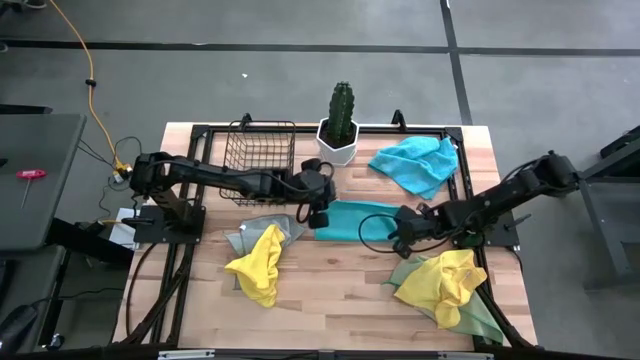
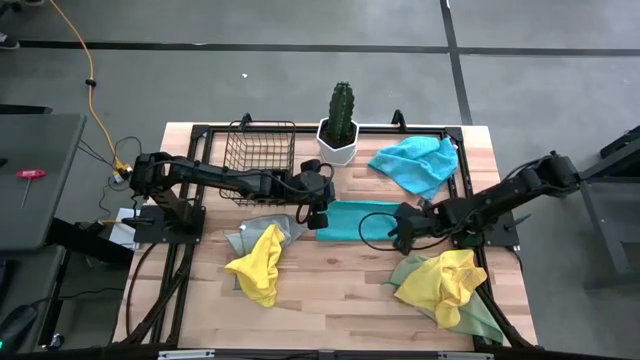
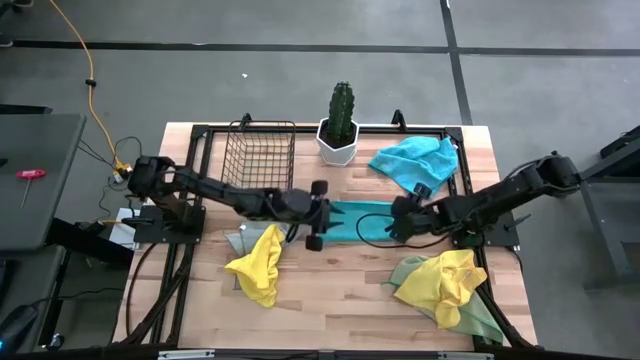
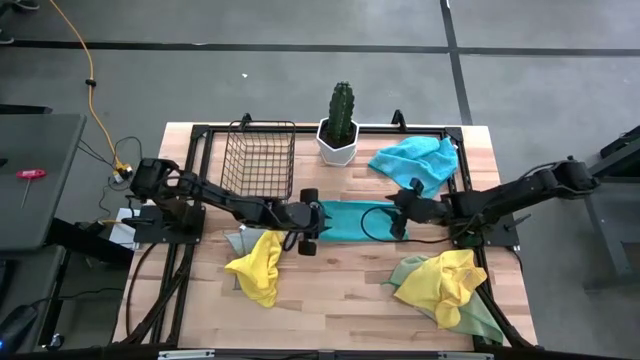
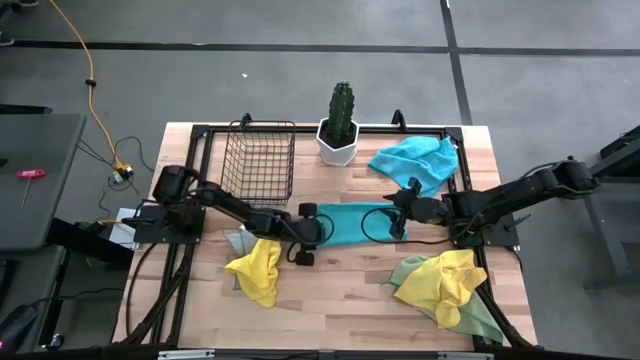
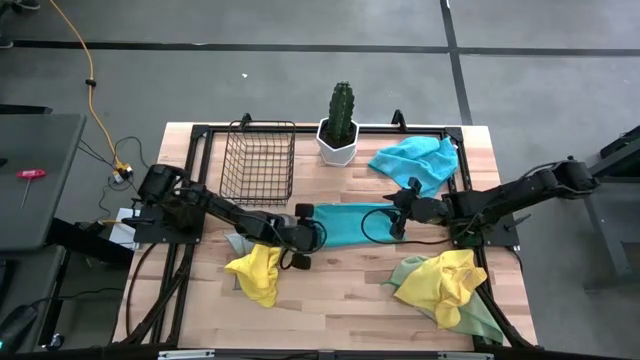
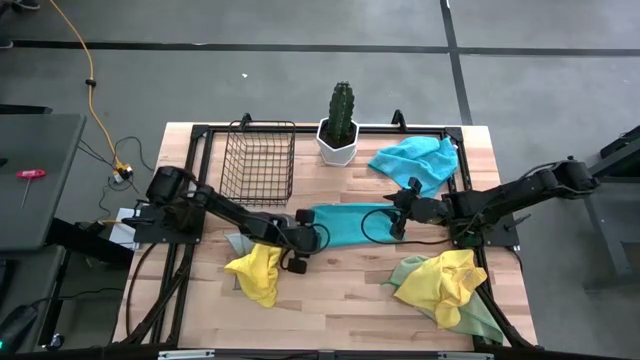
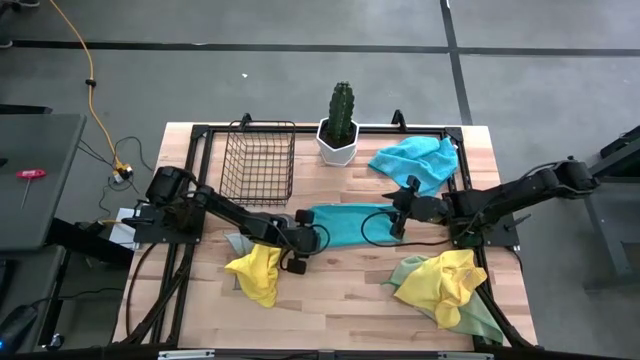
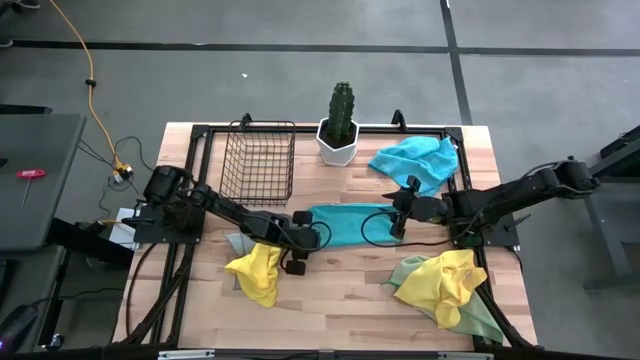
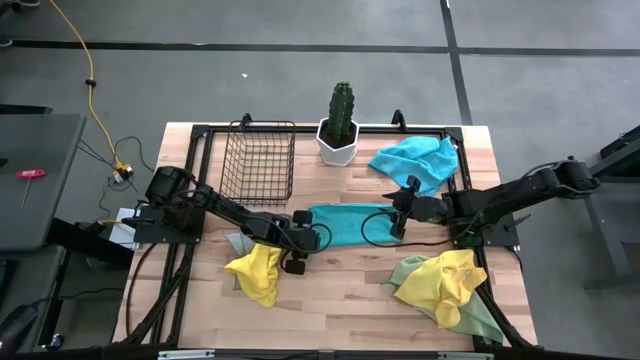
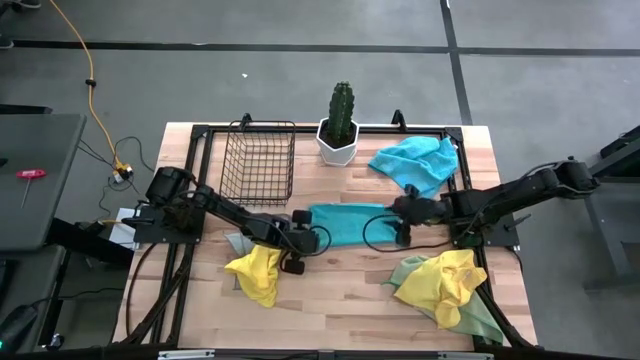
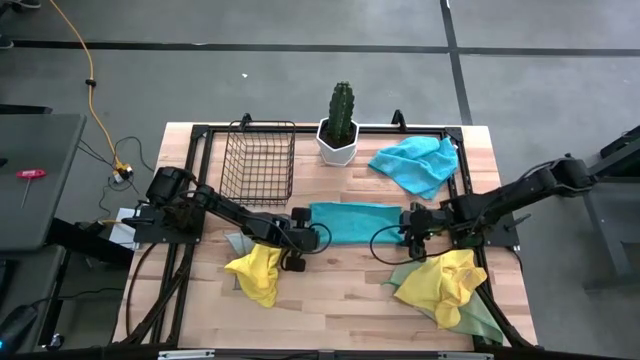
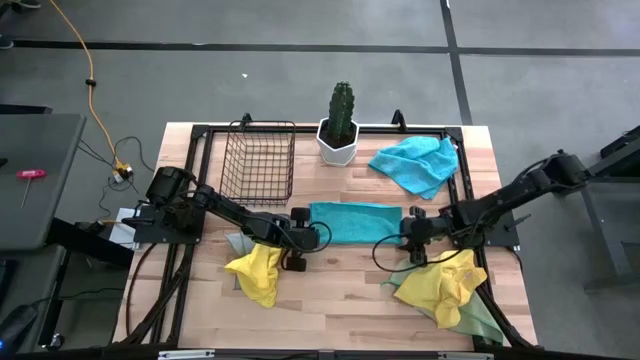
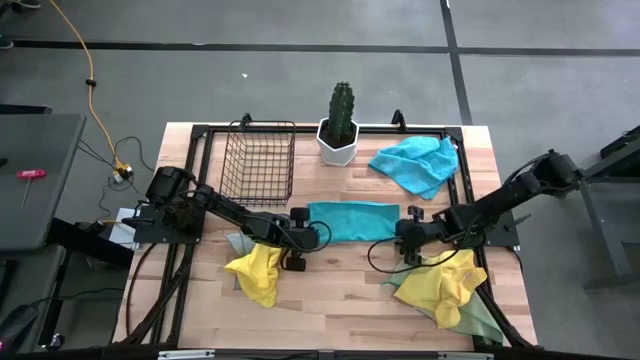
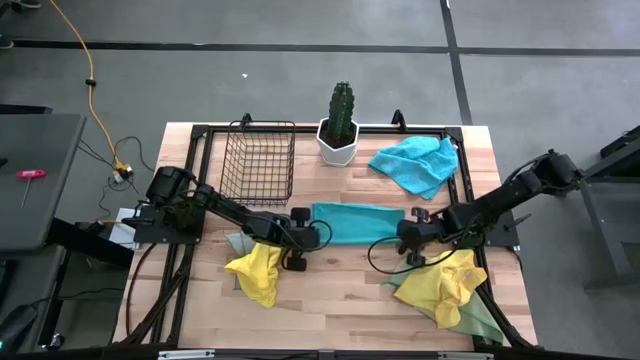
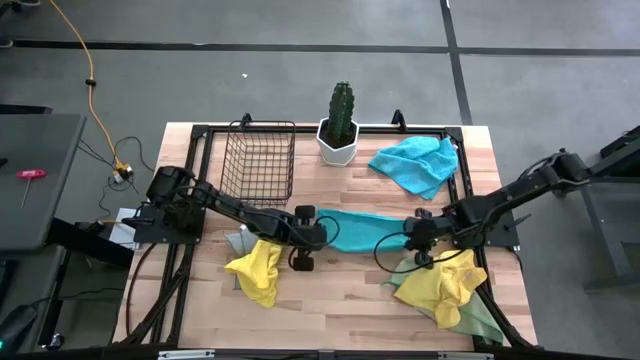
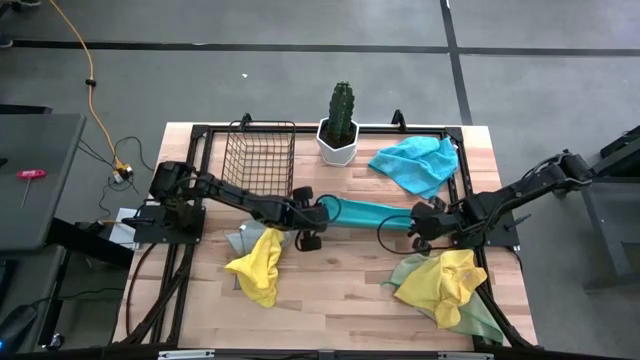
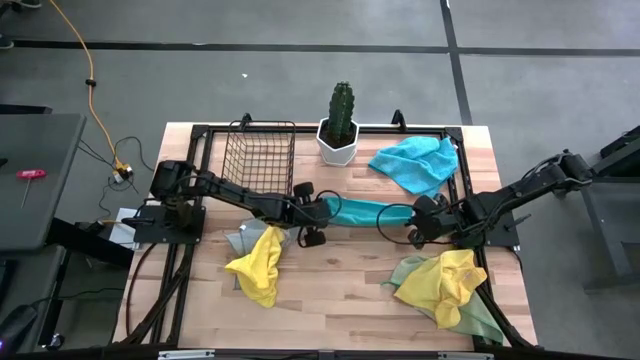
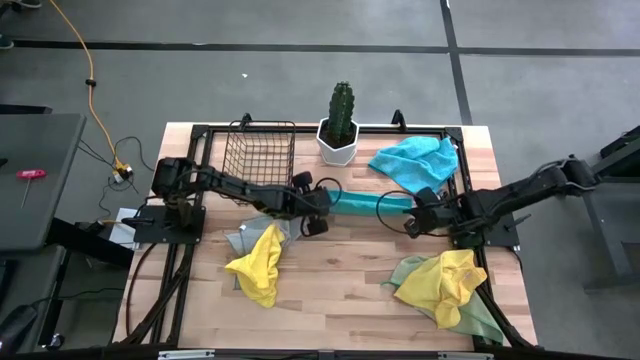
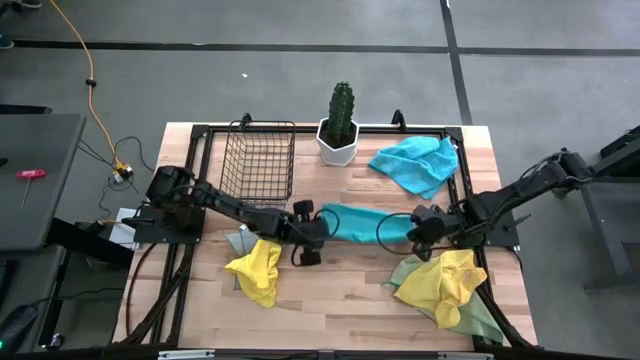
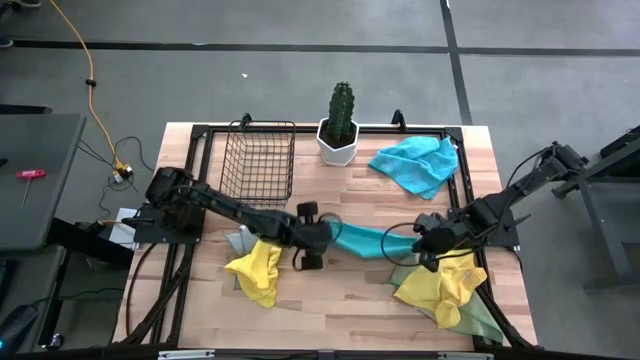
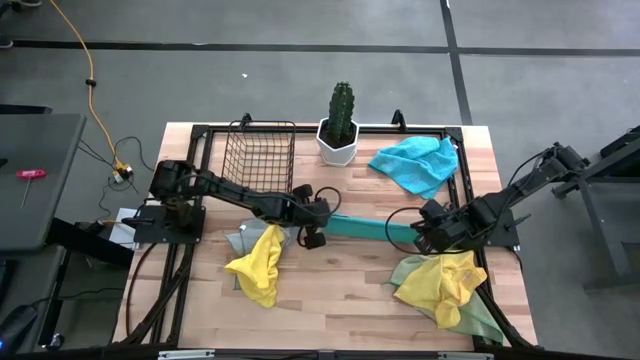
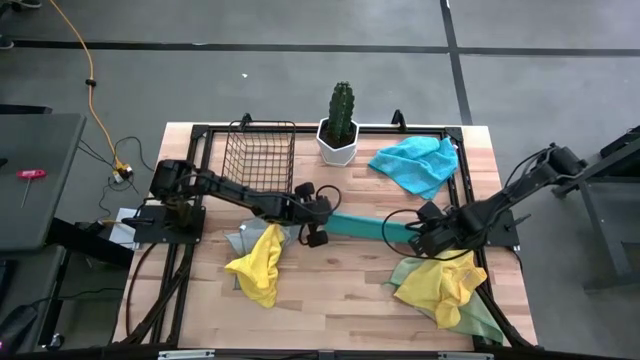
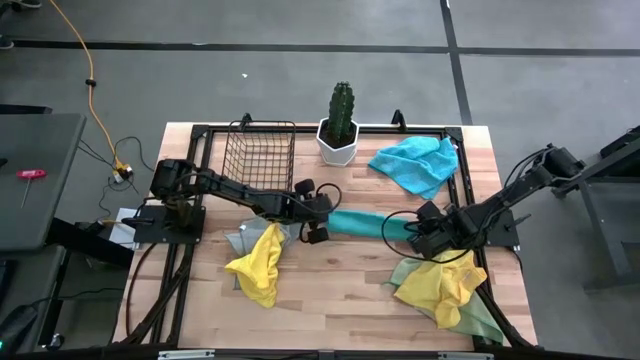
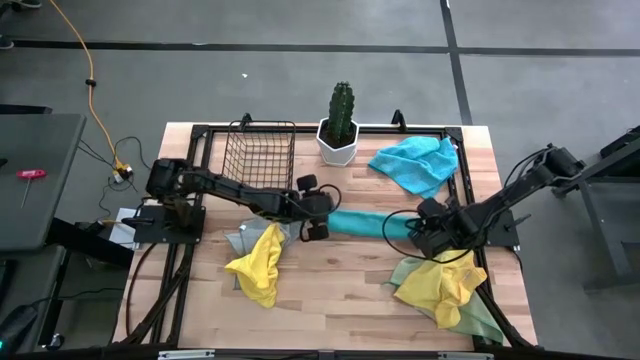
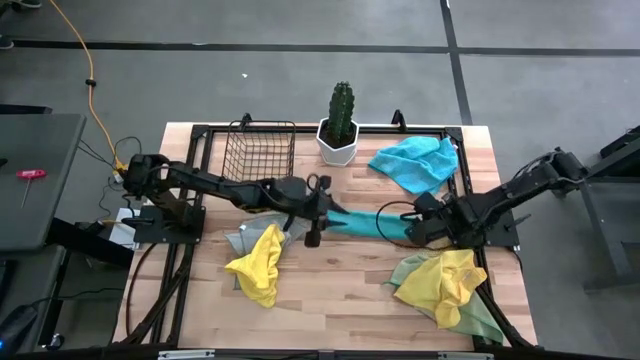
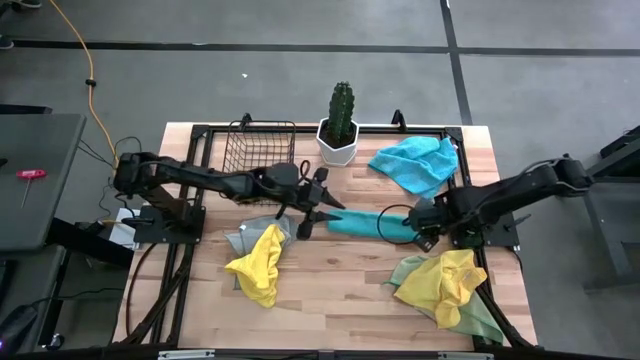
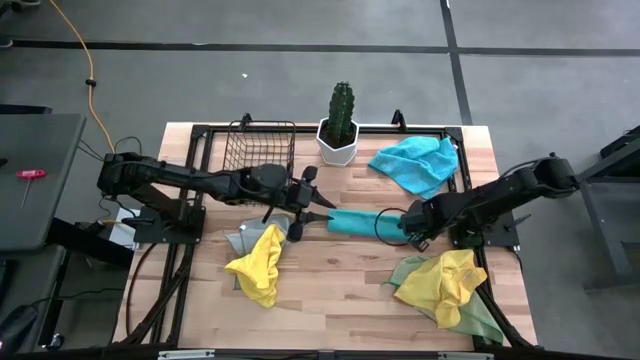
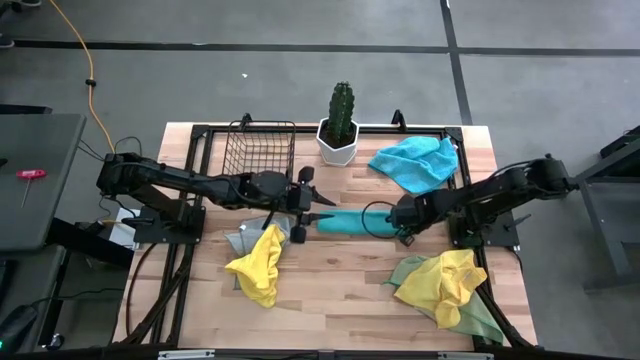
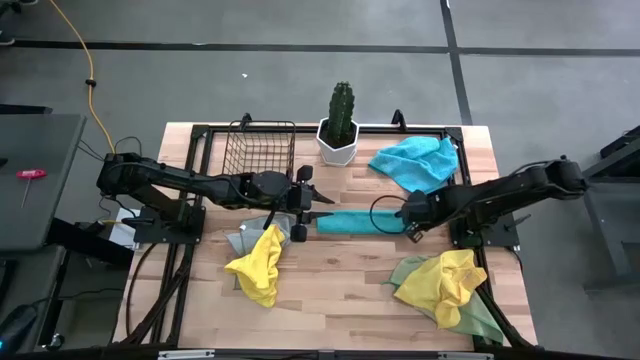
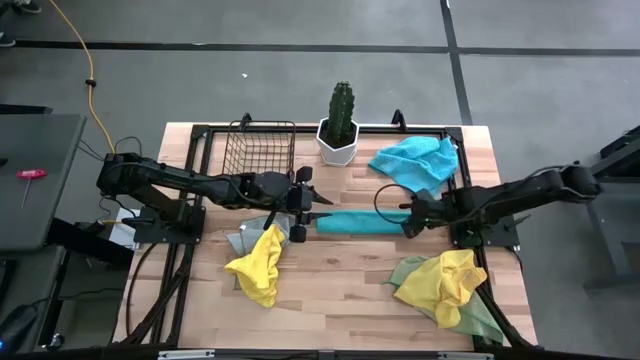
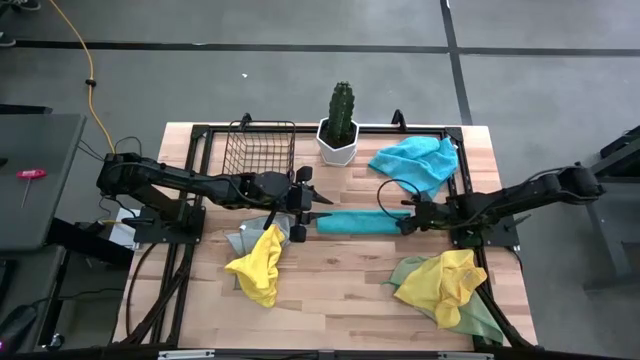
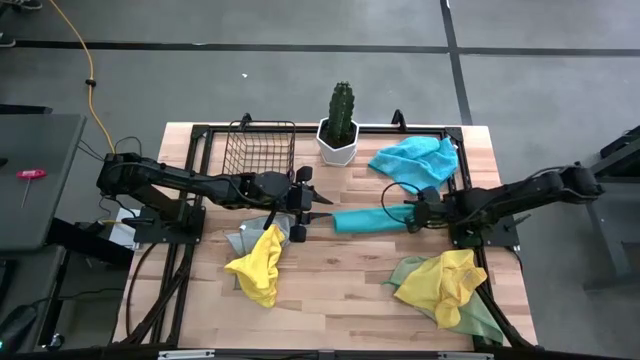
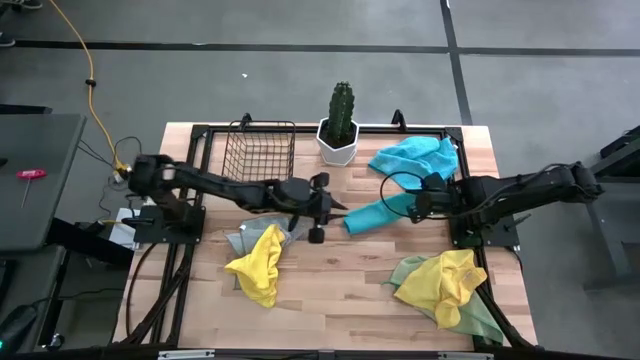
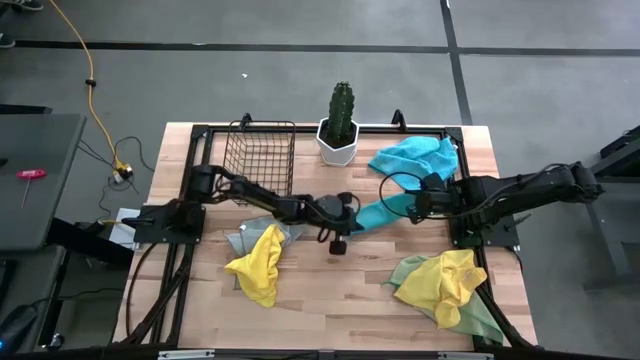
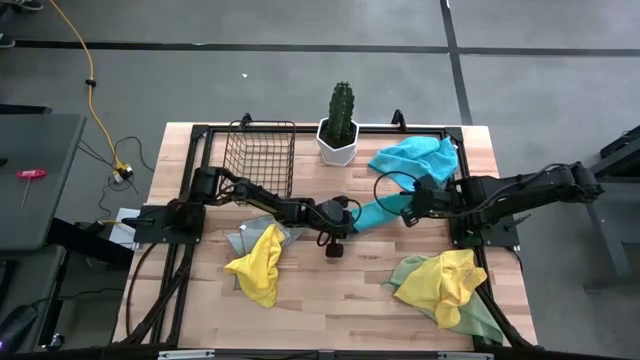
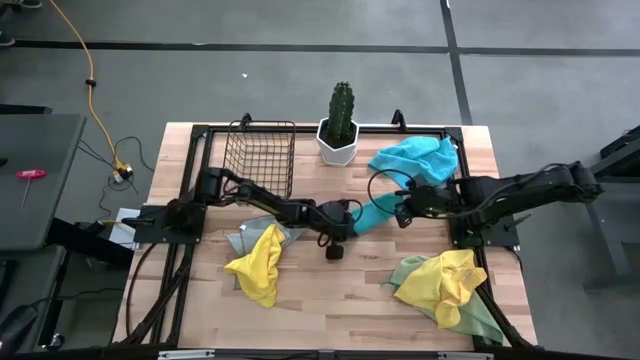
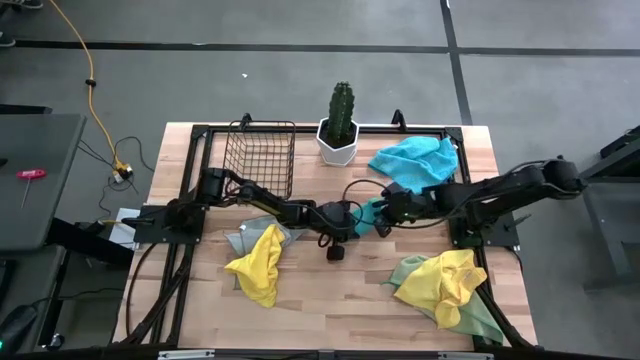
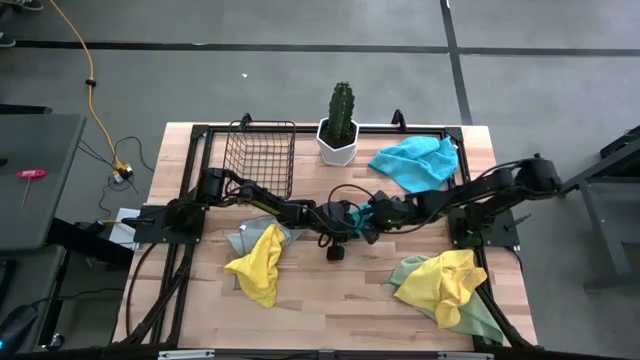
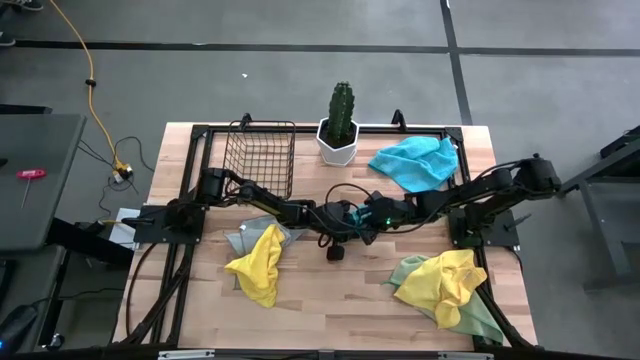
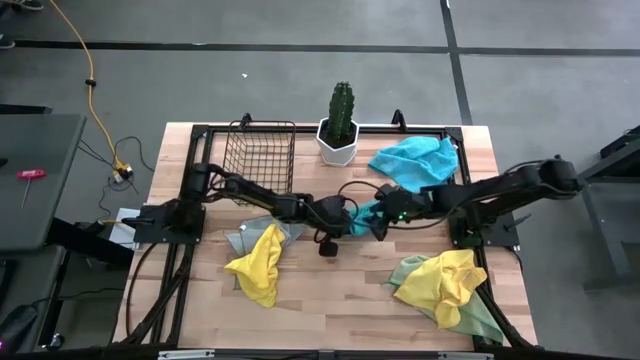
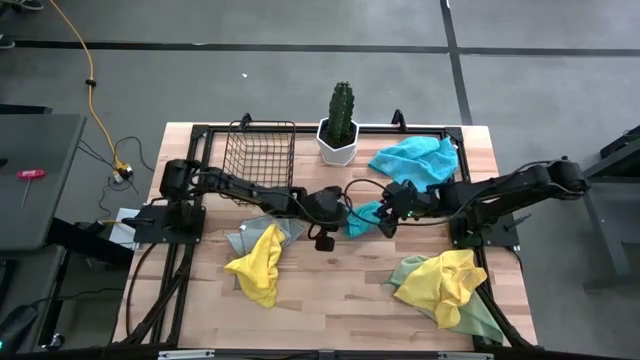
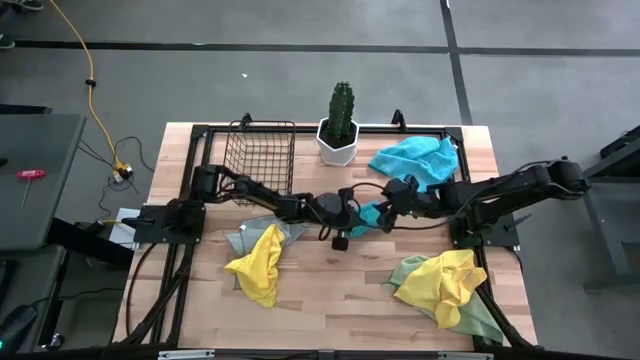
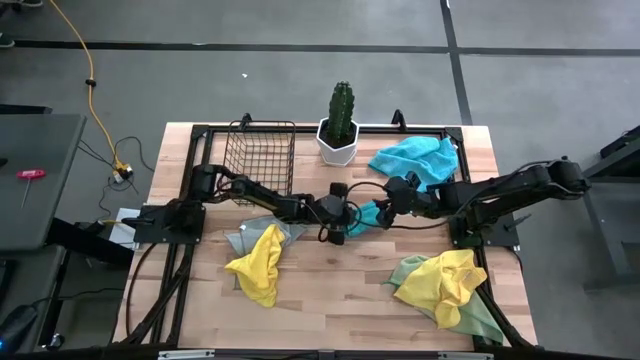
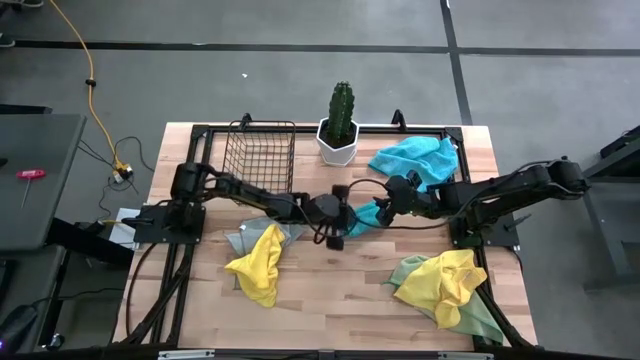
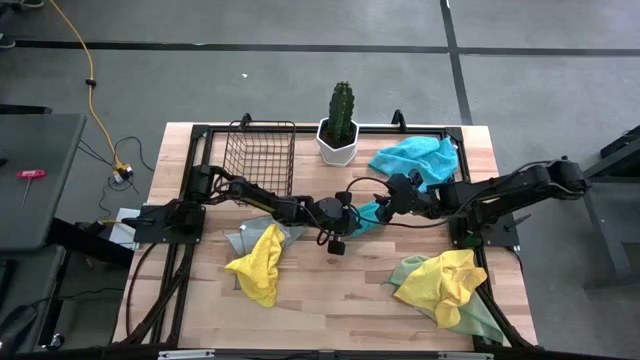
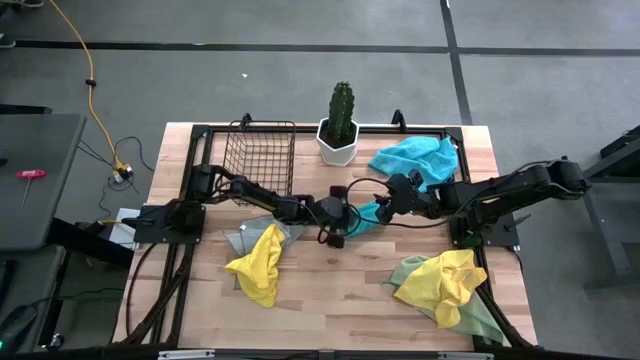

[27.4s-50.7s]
Task: Fold microfiber towels
Fold the top blue microfiber towel on the table
